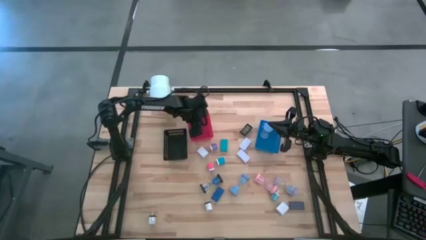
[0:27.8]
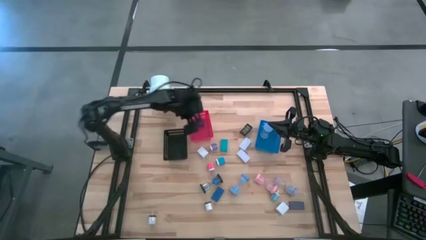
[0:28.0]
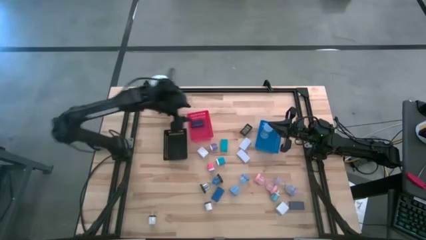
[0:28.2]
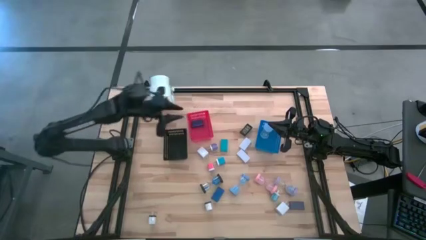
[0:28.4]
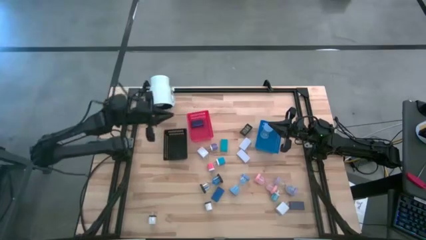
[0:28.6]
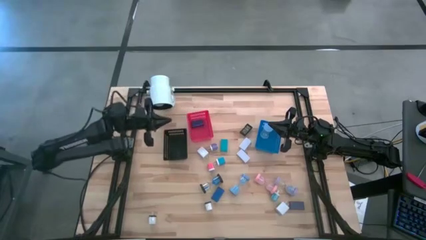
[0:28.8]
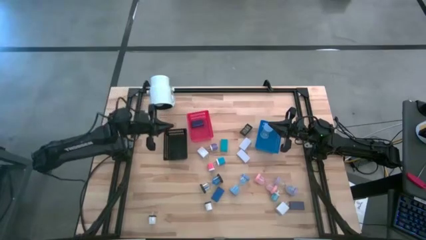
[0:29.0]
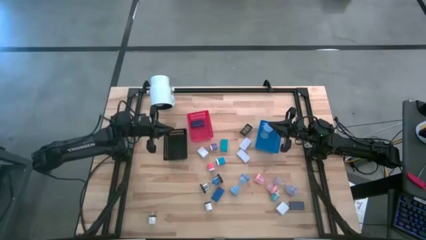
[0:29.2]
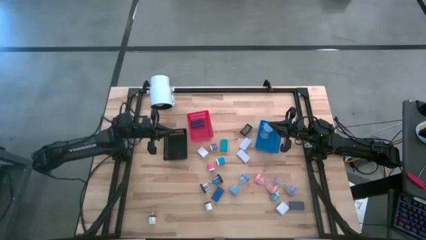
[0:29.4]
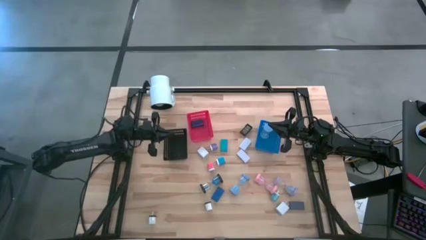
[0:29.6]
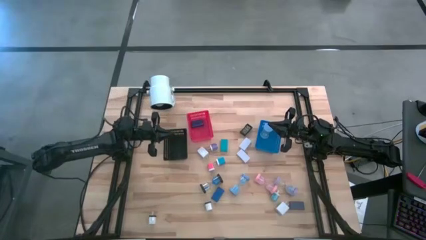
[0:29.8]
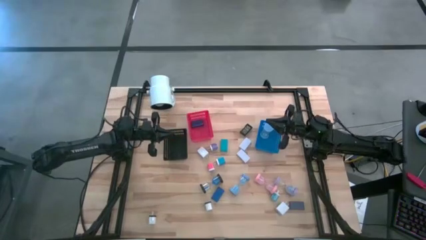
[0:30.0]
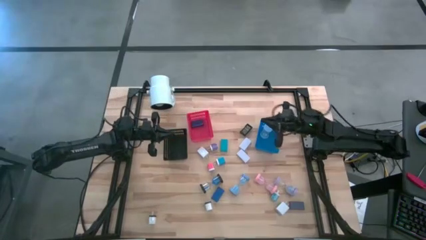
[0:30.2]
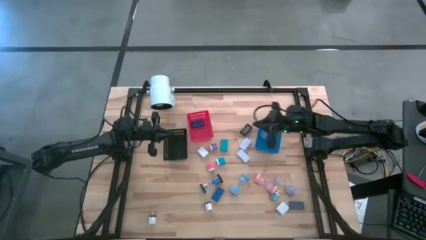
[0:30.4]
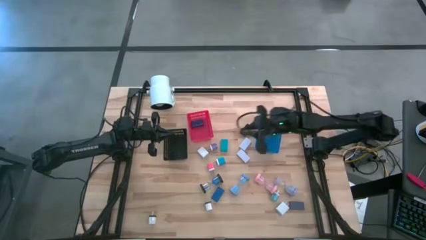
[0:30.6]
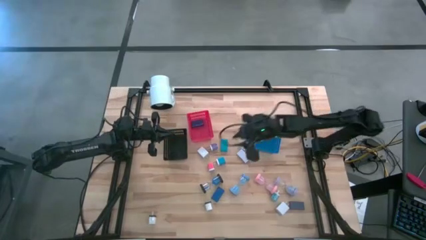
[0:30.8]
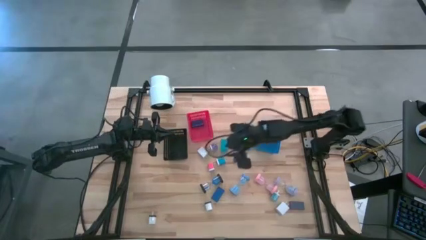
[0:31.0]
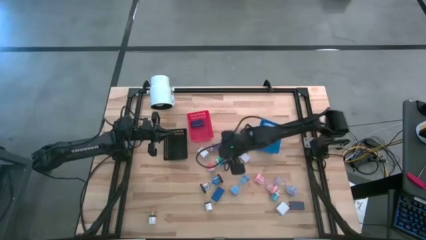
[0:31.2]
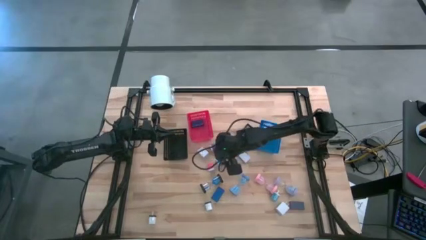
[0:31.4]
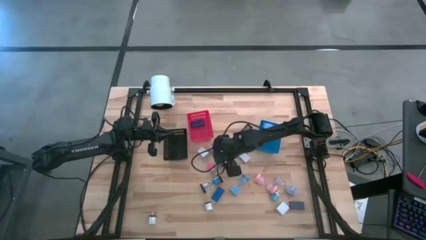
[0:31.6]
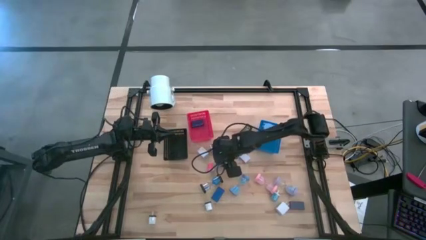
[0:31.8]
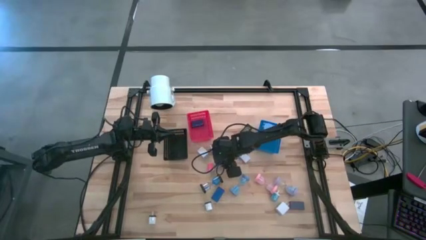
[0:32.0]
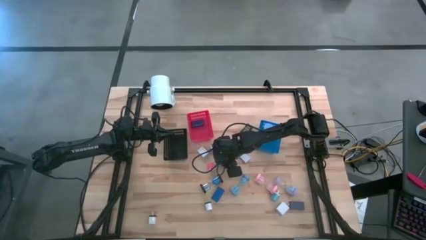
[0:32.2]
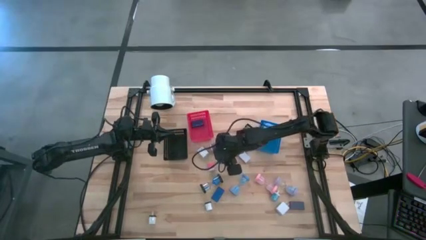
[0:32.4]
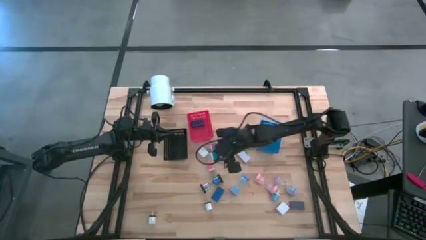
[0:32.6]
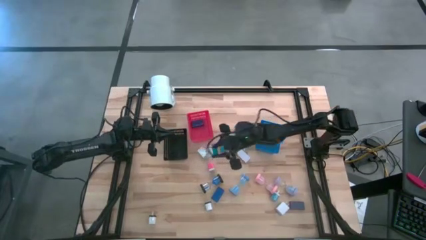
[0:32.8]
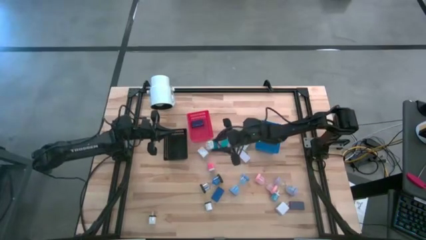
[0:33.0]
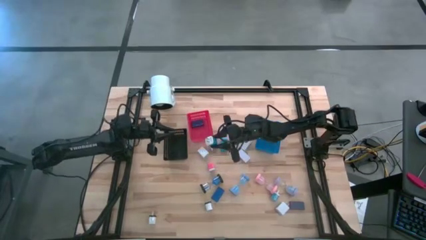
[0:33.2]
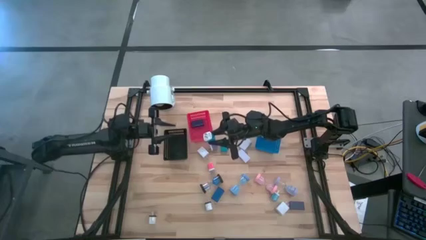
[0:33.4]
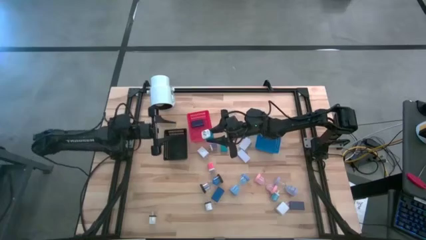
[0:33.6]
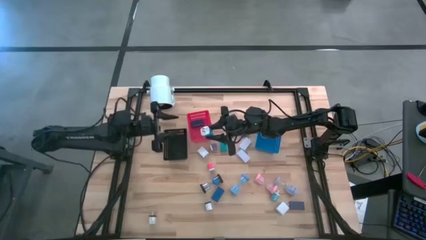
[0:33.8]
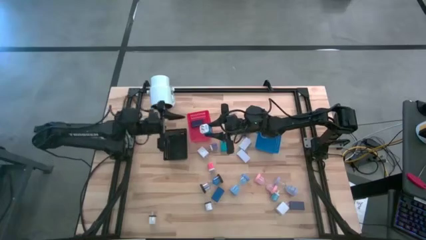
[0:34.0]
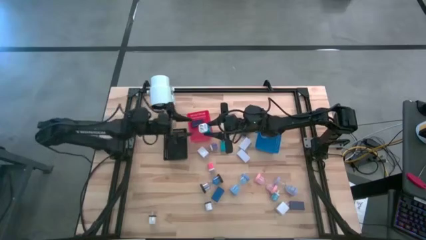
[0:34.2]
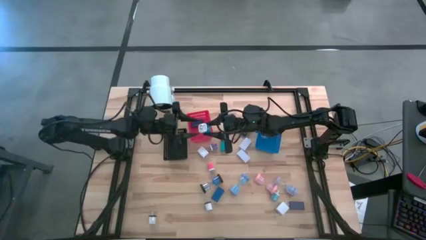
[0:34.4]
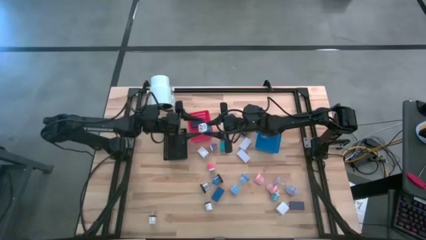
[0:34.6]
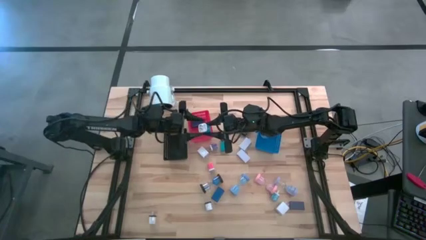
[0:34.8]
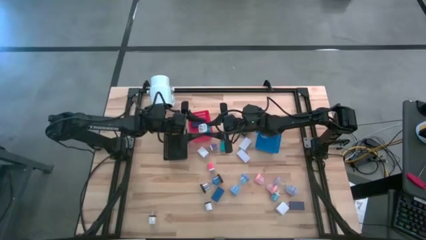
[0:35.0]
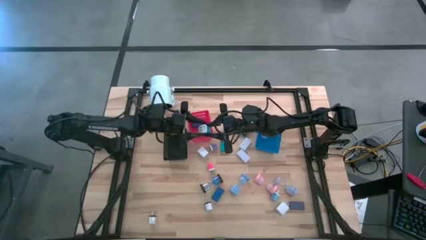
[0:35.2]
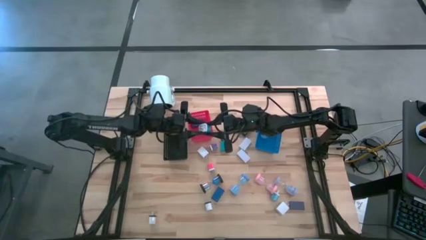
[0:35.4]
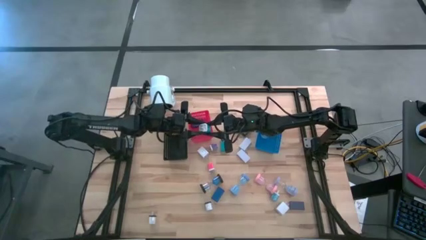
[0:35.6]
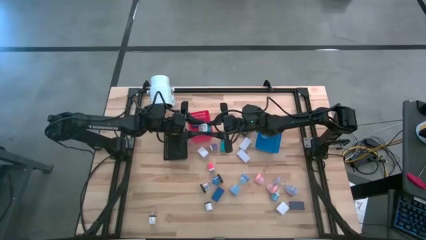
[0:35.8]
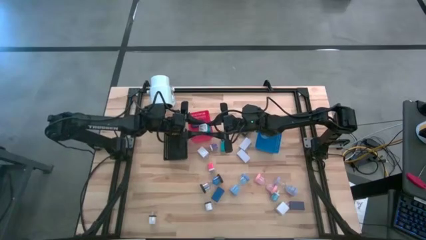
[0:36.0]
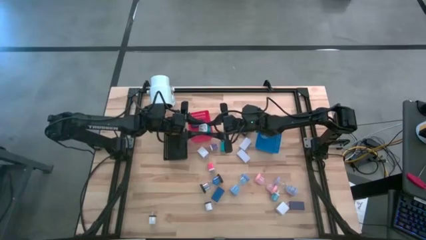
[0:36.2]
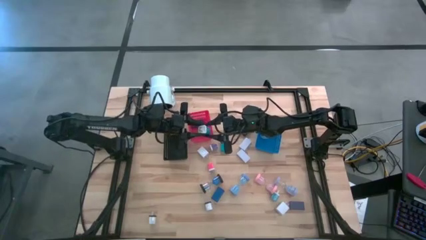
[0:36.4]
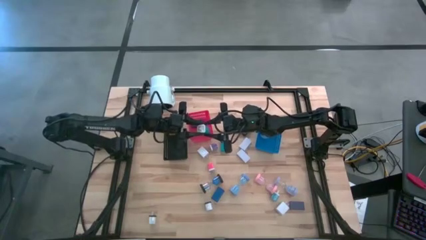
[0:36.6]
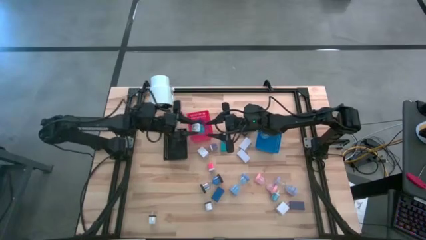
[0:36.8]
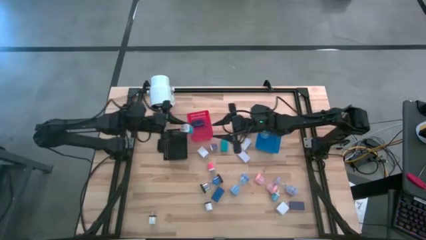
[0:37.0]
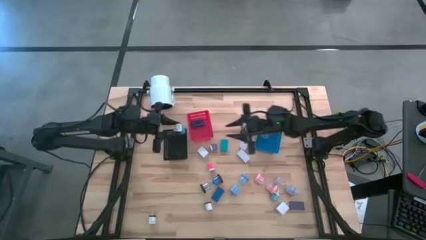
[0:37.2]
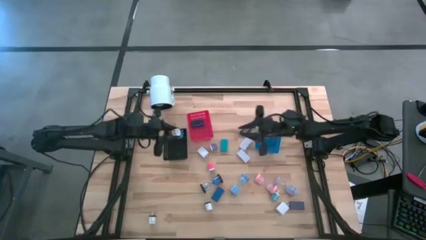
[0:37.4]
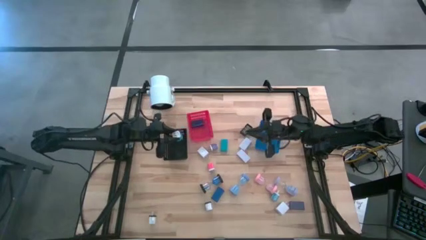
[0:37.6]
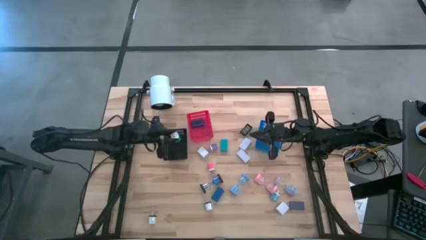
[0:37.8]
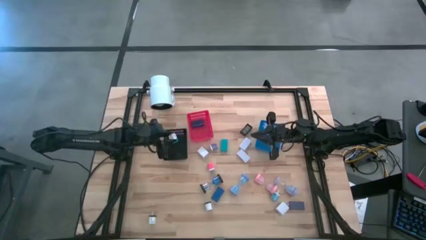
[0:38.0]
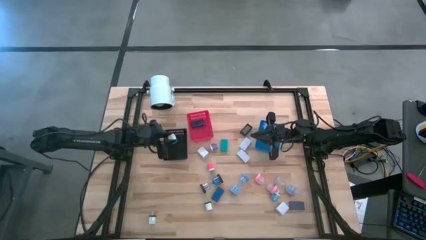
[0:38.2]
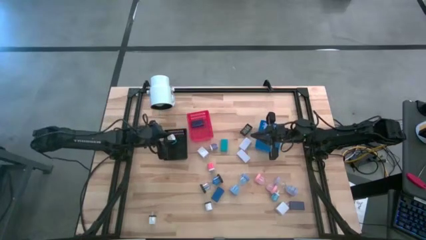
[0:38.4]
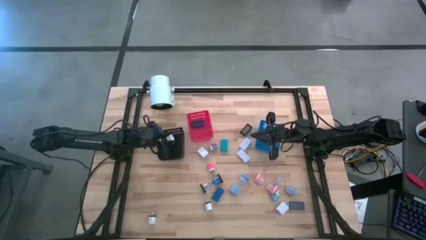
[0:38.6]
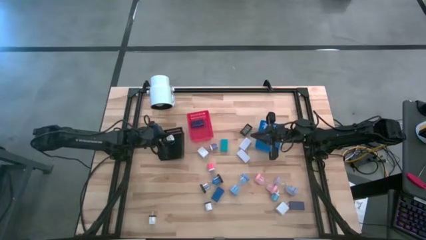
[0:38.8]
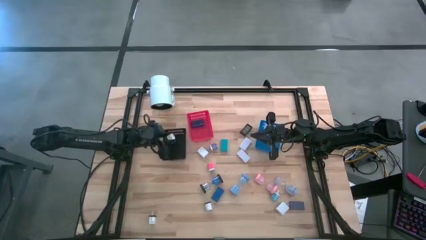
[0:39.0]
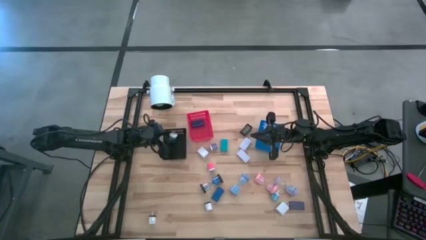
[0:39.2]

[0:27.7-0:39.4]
Task: Pick & Place Office items
Put the left blue charger adapter into the black bin
